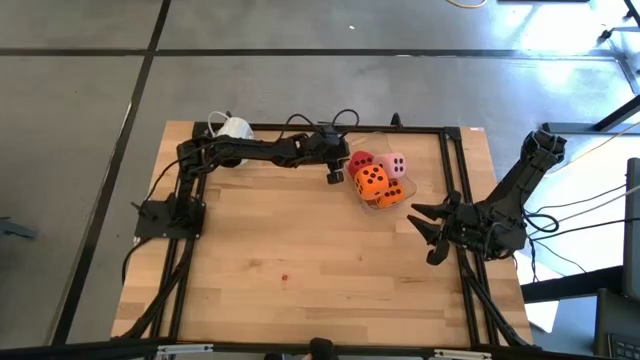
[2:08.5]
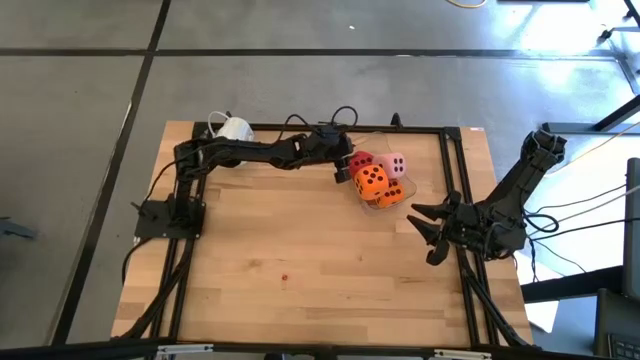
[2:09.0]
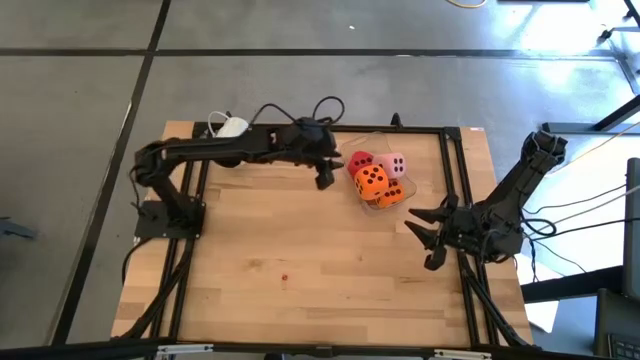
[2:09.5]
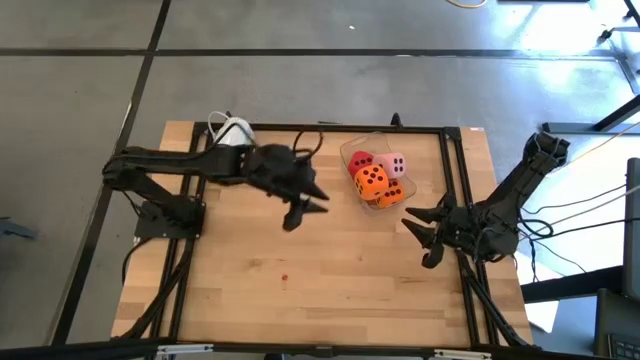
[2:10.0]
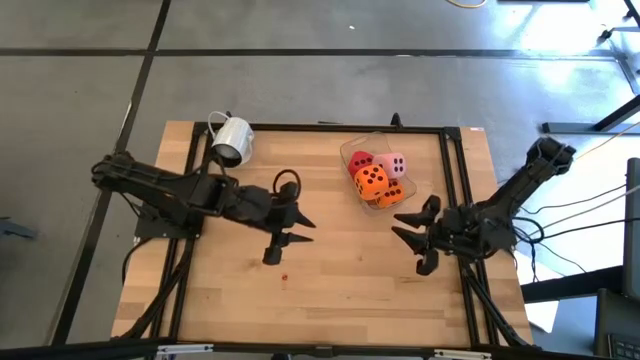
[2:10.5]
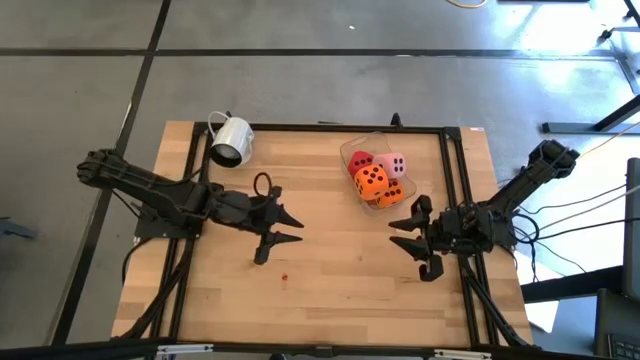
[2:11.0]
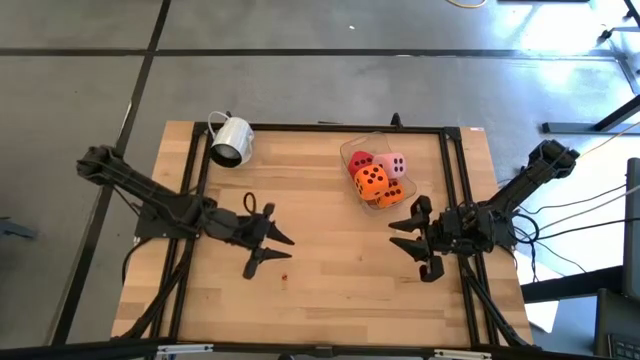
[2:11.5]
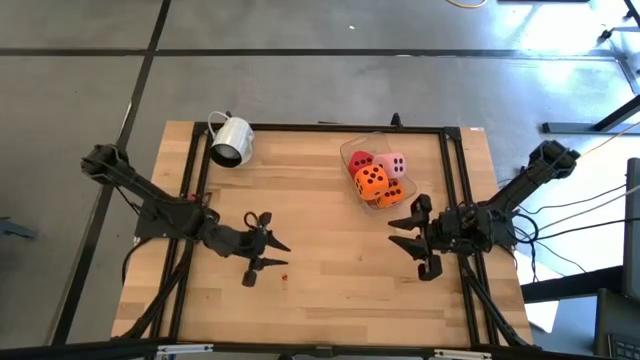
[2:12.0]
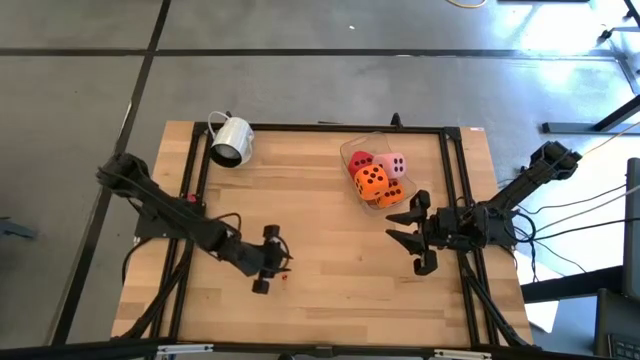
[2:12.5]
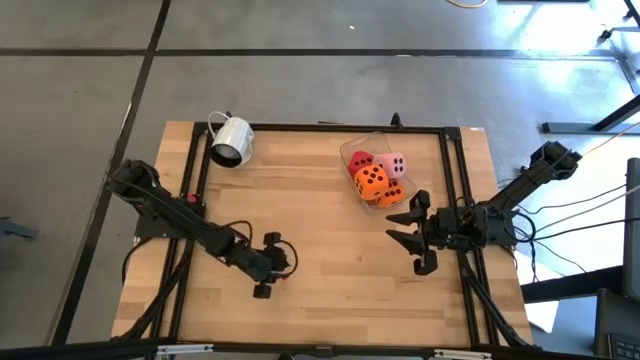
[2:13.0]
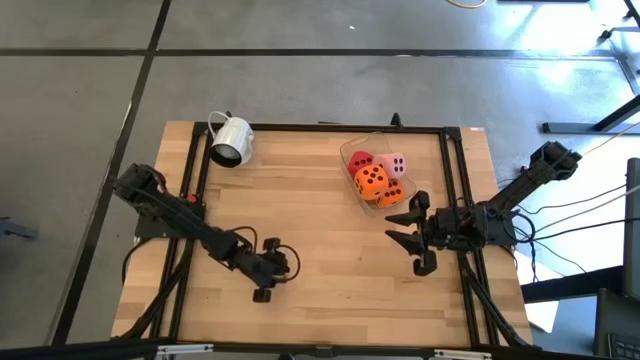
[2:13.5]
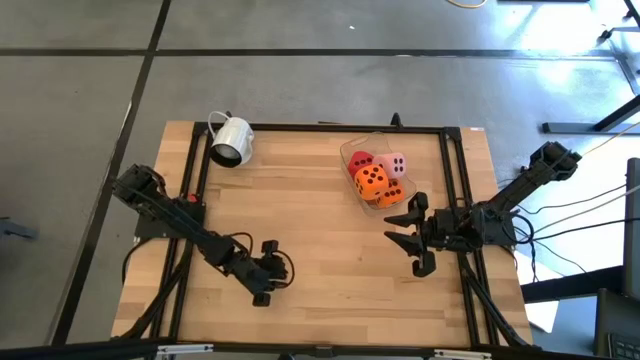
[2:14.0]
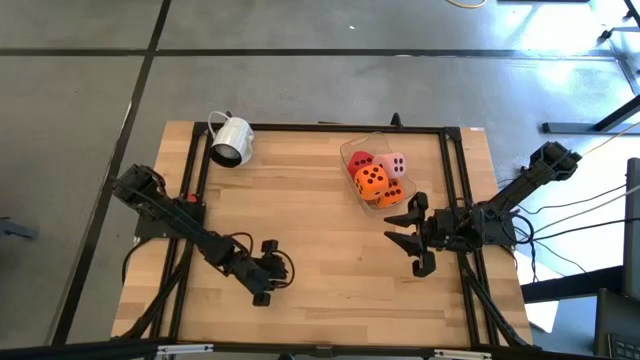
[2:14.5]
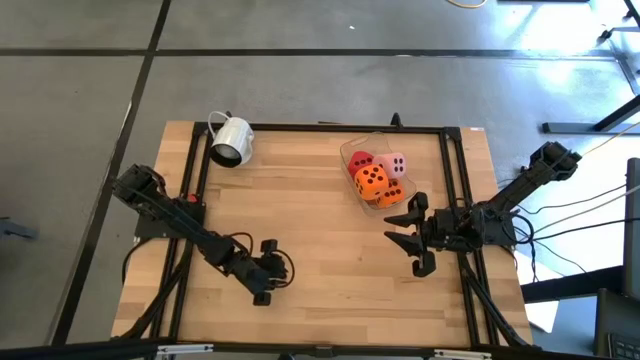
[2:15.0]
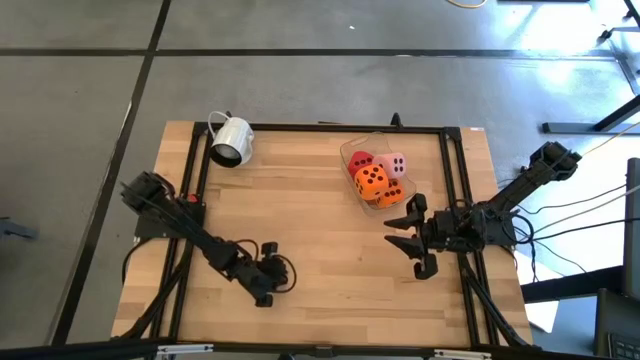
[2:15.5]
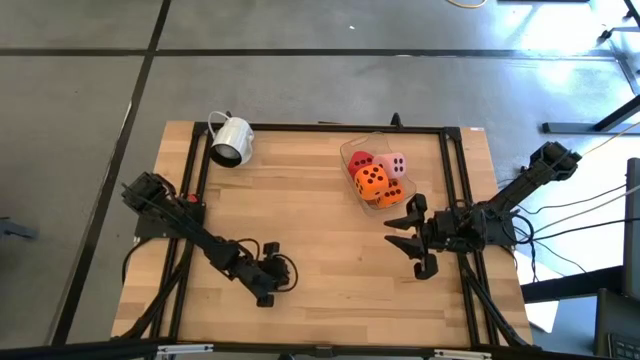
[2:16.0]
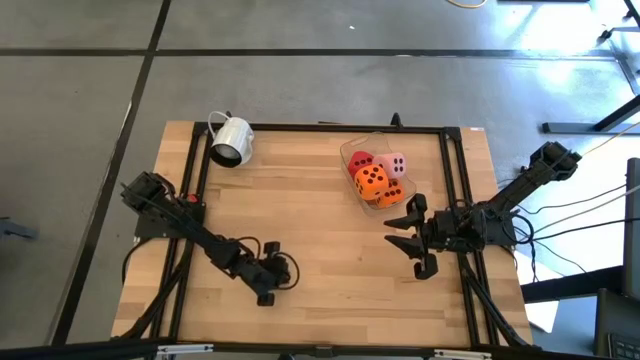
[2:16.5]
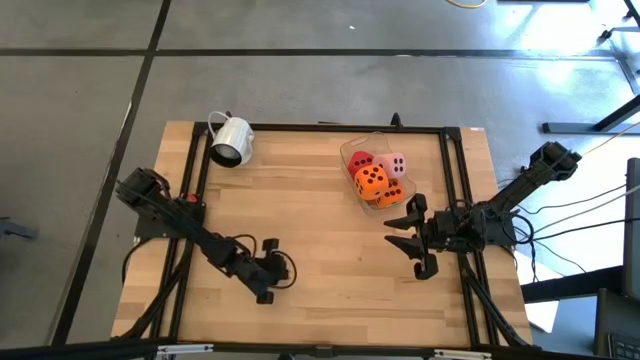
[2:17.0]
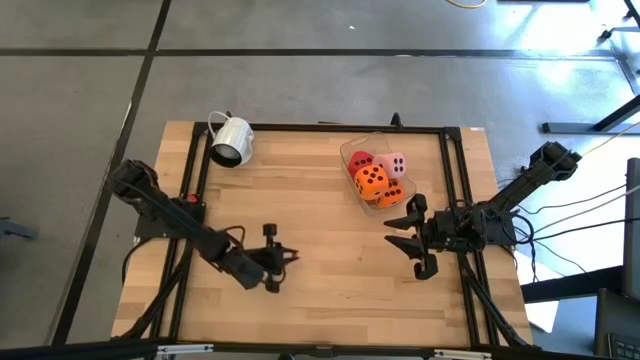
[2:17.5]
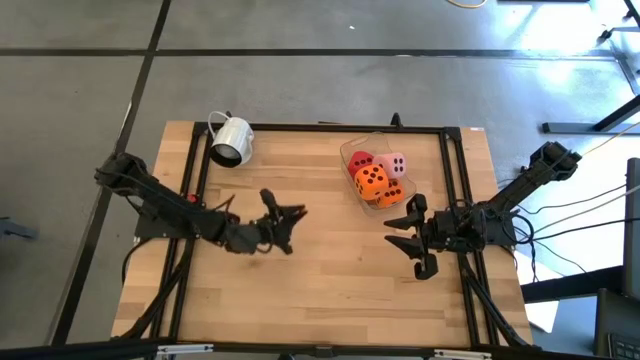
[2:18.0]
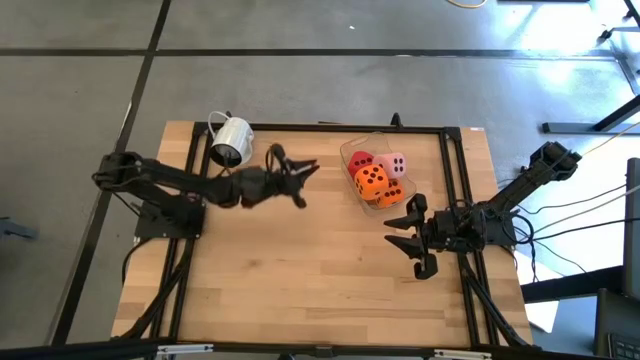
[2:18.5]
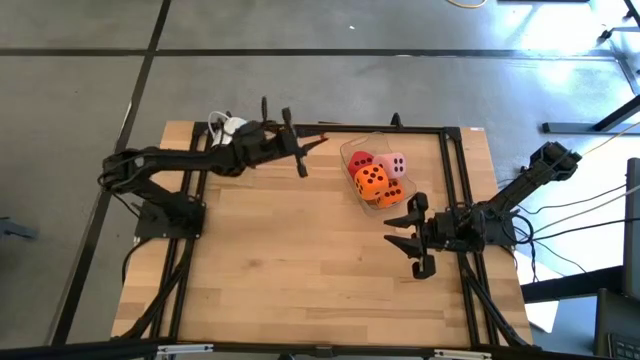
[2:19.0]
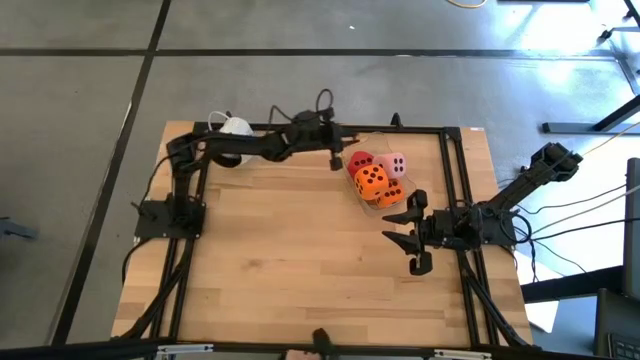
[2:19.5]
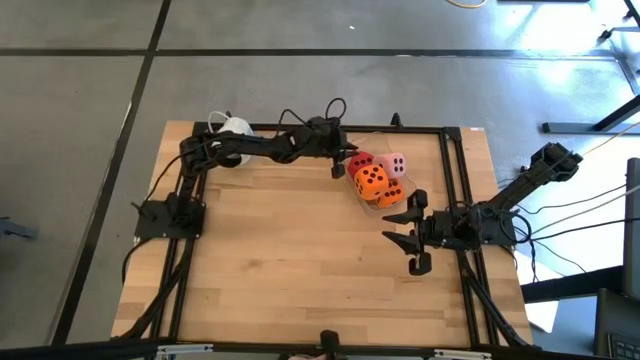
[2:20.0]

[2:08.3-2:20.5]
Task: Pick & Place Dice
Put the small red die in the bin

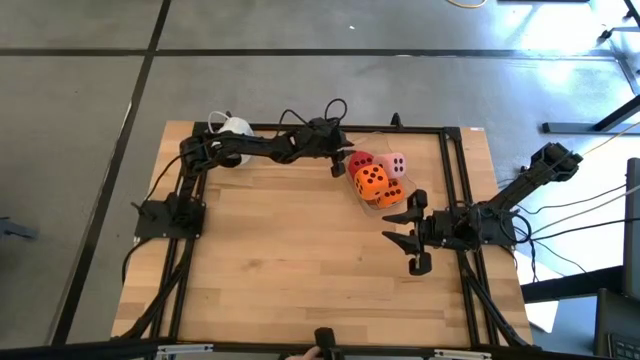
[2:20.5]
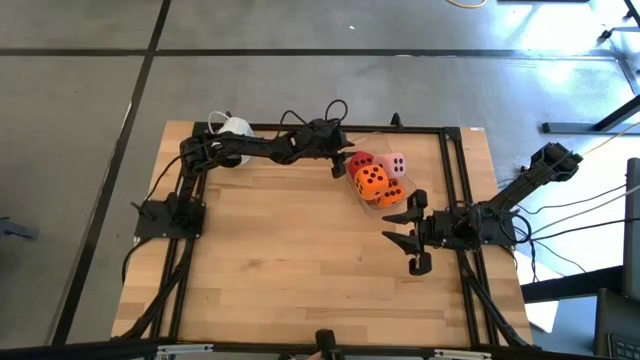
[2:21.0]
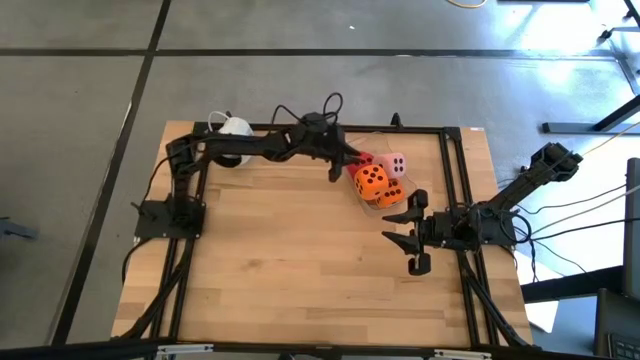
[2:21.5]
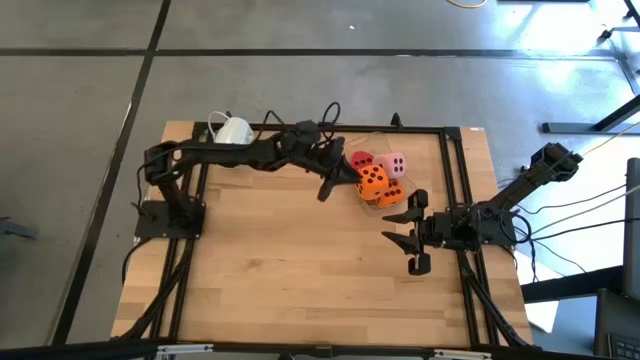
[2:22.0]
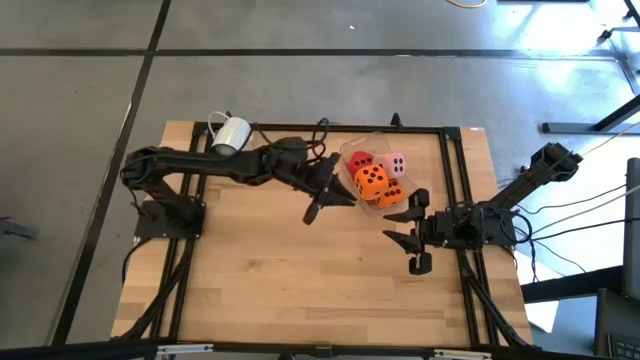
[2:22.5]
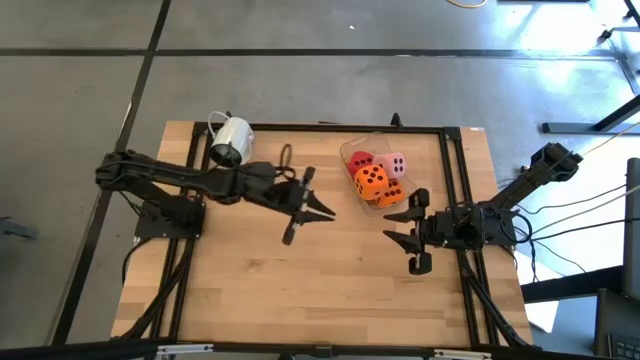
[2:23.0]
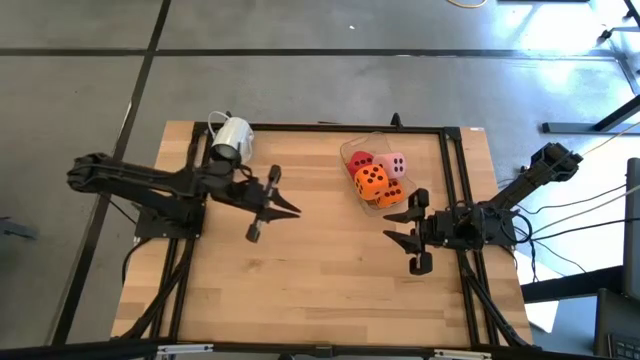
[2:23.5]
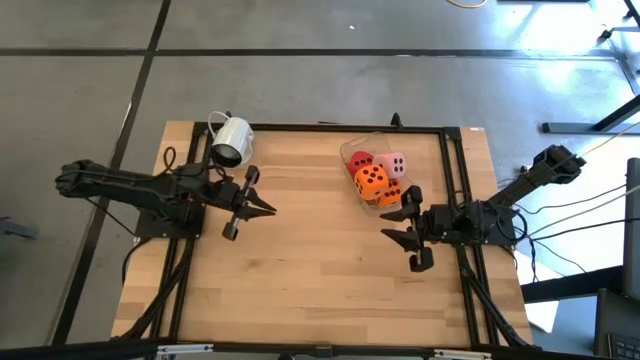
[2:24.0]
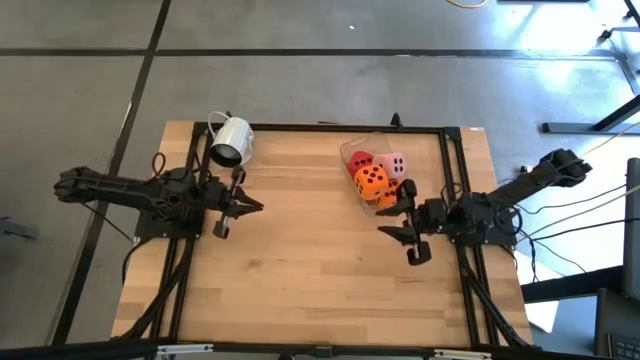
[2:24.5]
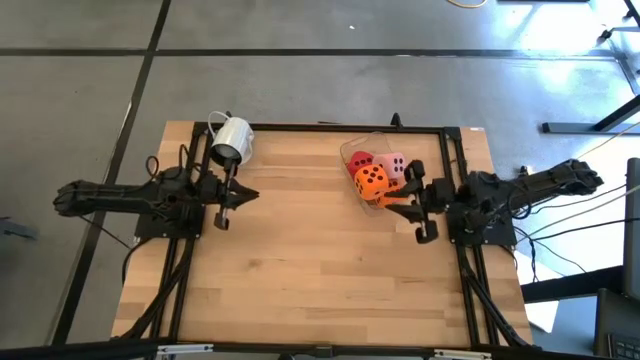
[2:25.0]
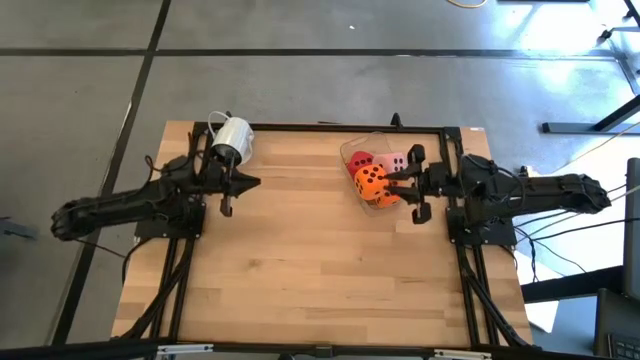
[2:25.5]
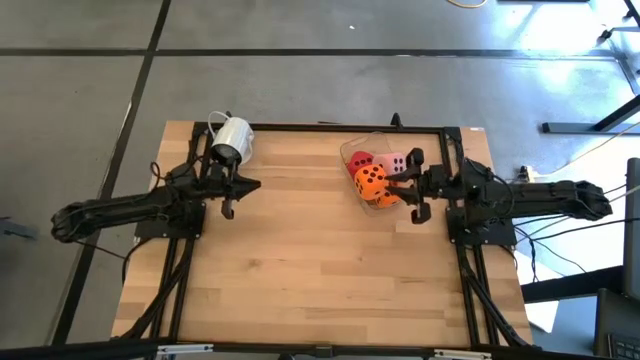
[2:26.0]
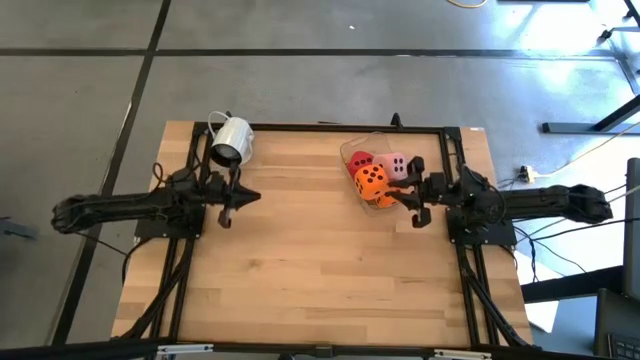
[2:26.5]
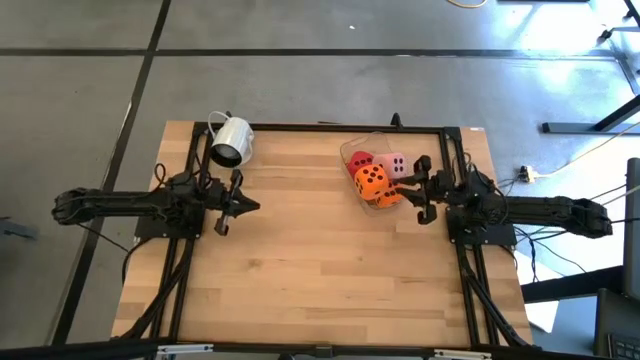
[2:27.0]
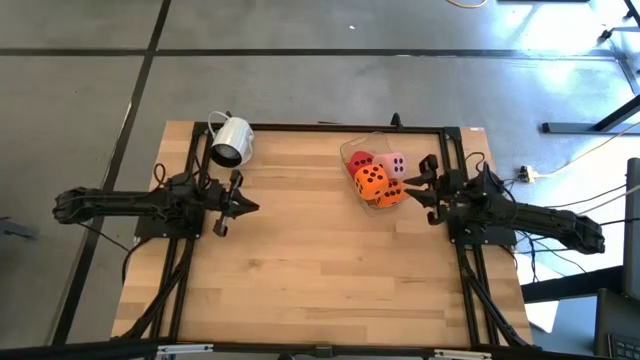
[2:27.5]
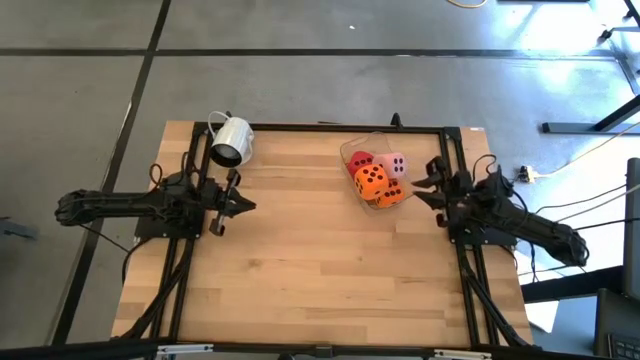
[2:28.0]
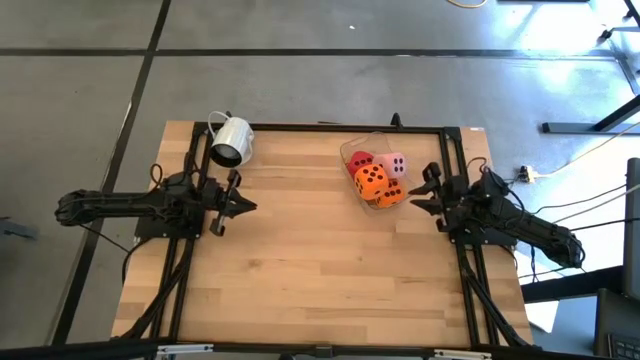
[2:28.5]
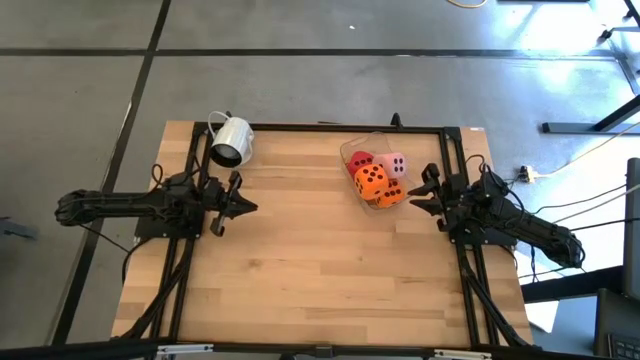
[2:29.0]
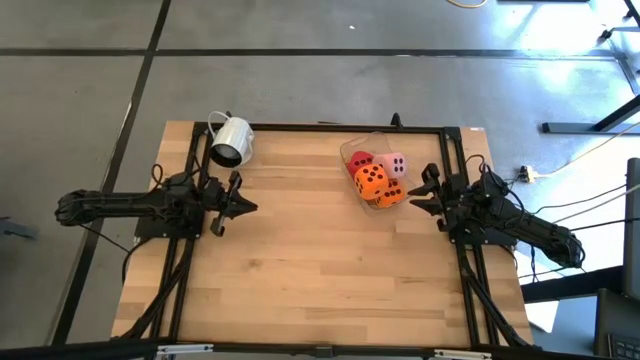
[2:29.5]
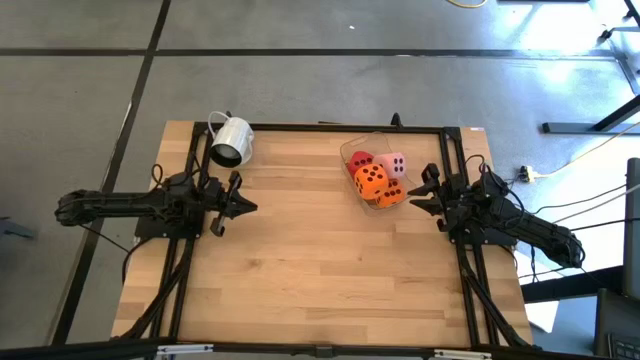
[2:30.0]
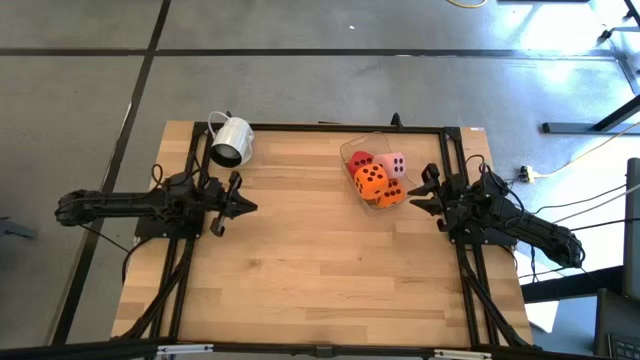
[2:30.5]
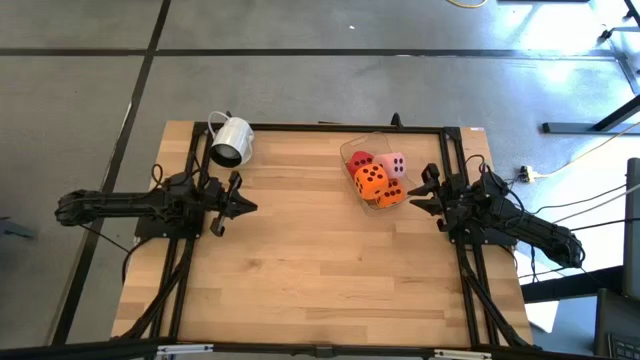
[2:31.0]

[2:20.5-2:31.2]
Return to Home Position

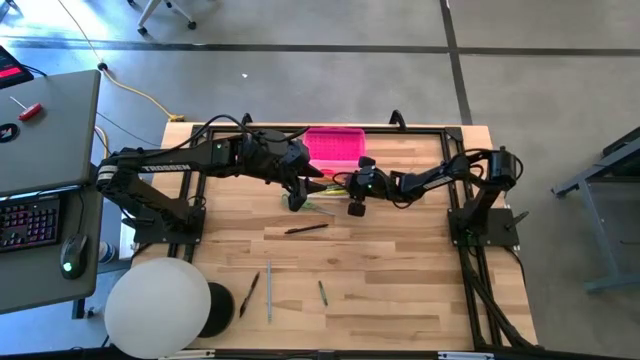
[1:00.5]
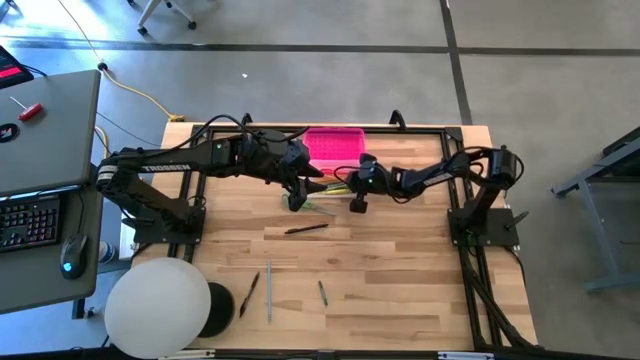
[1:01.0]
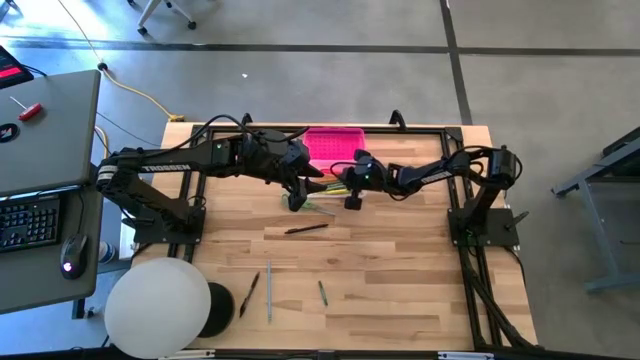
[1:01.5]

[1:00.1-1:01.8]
Task: Pick & place school supplies into a supply box
Adjust the yellow pencil into the supply box
